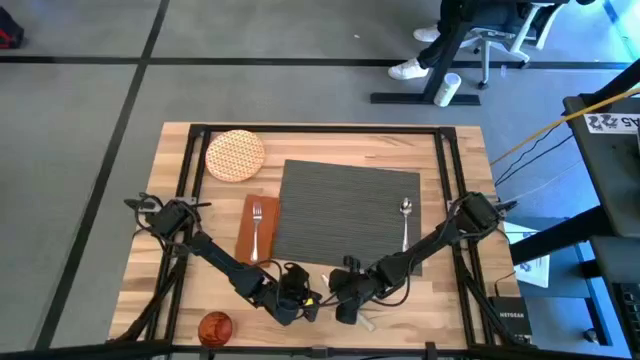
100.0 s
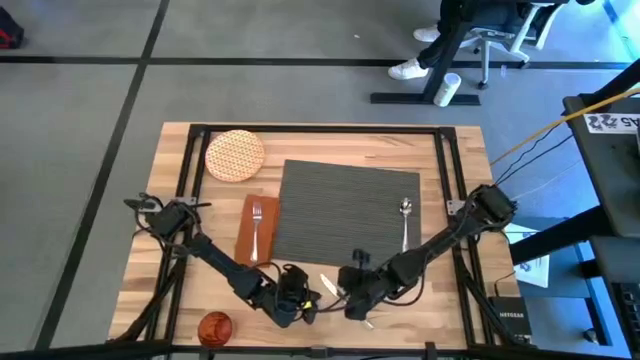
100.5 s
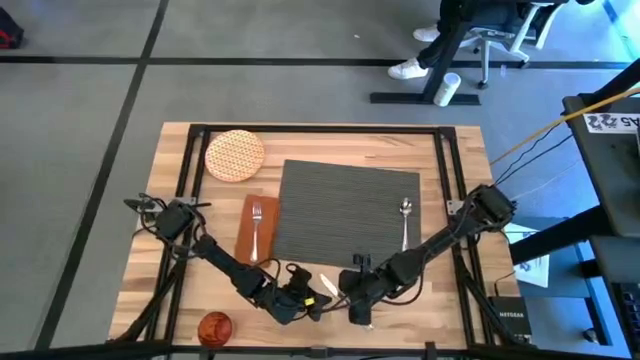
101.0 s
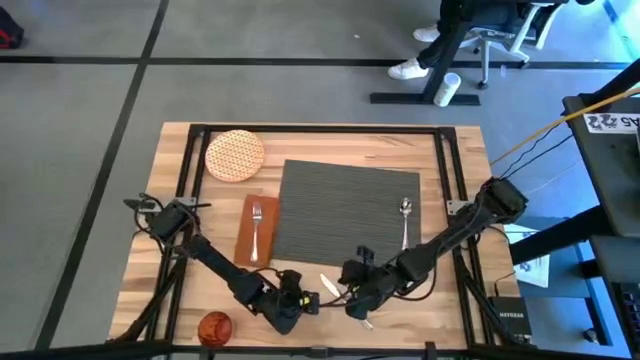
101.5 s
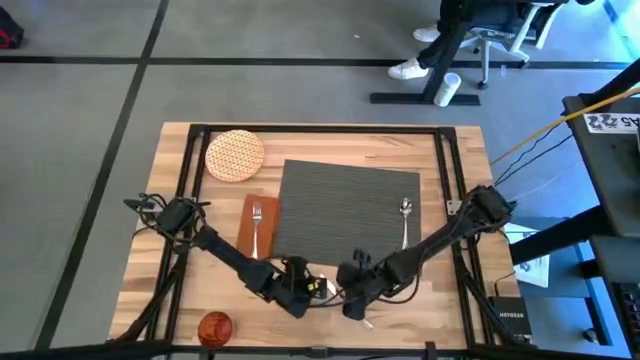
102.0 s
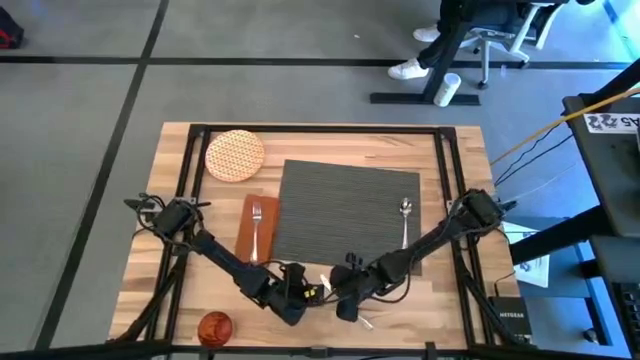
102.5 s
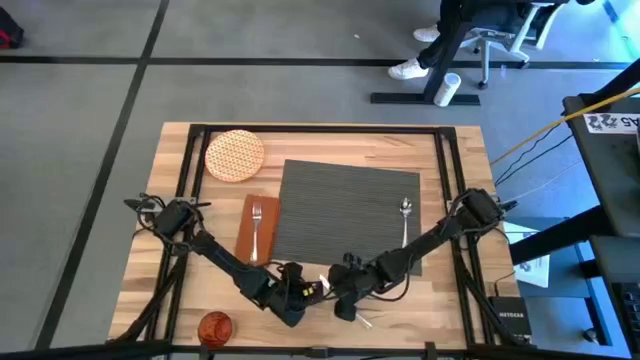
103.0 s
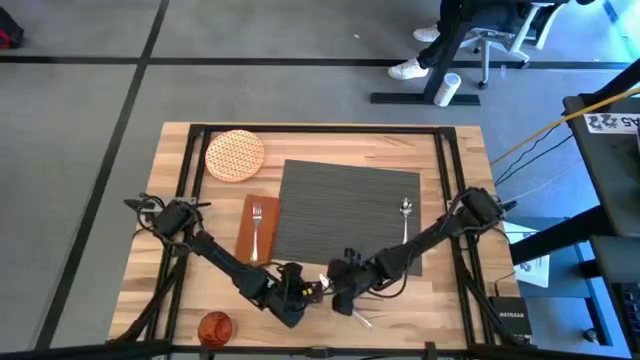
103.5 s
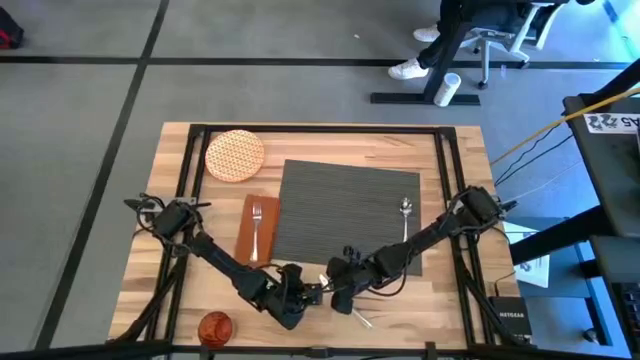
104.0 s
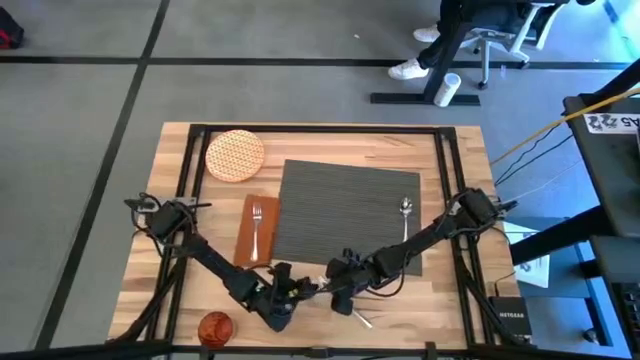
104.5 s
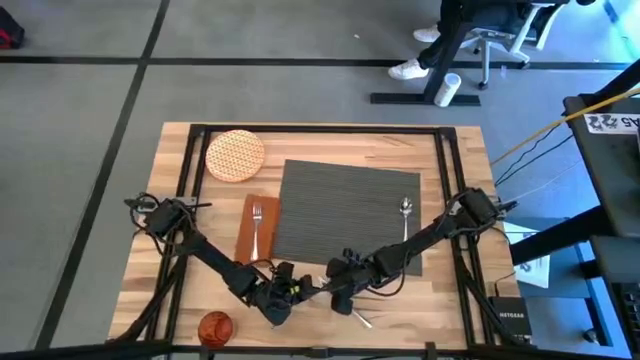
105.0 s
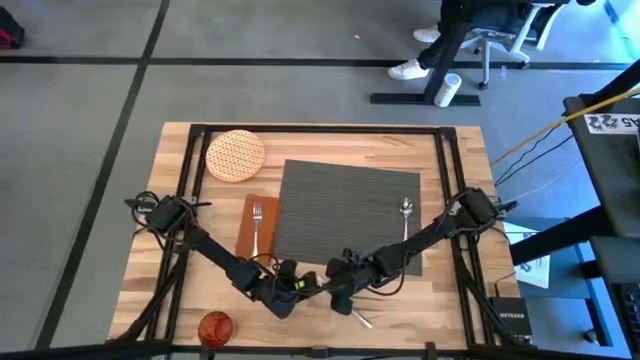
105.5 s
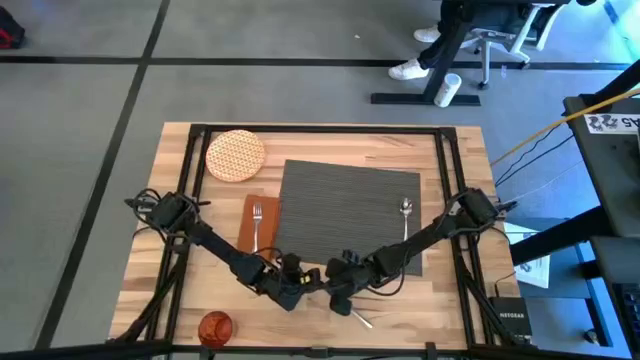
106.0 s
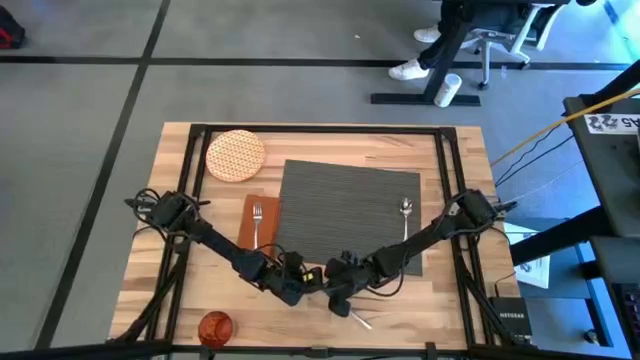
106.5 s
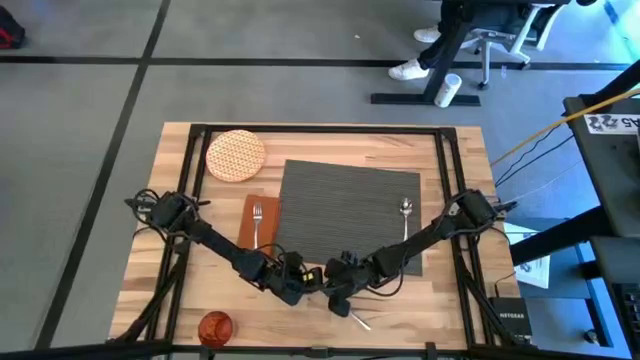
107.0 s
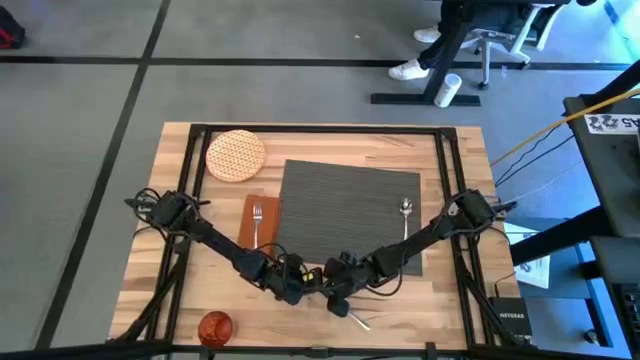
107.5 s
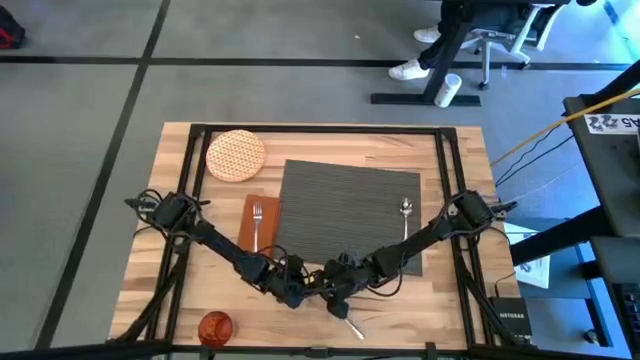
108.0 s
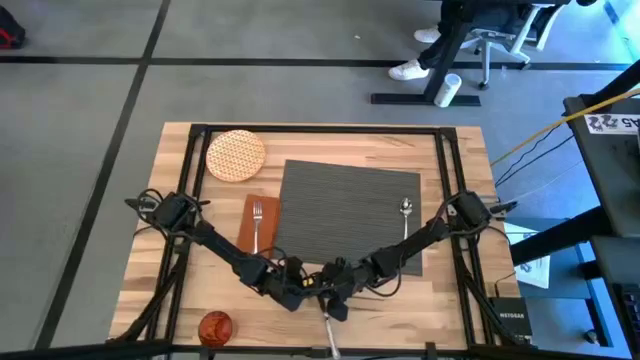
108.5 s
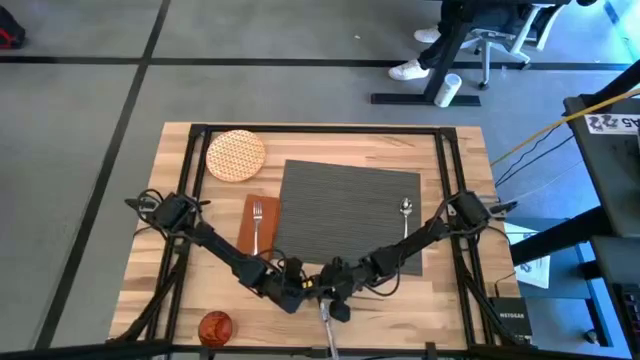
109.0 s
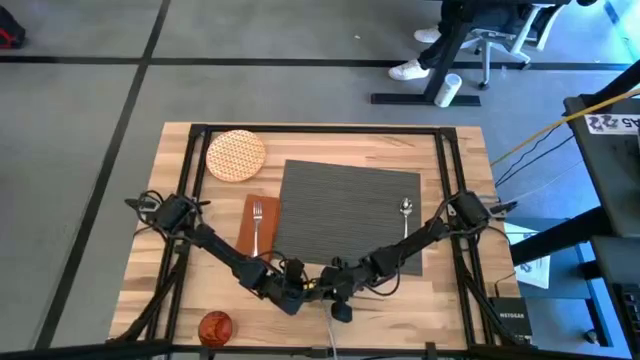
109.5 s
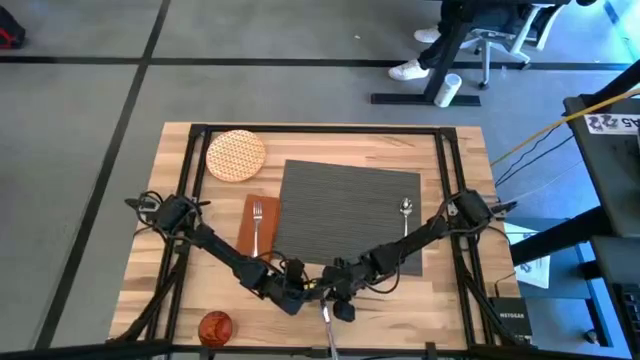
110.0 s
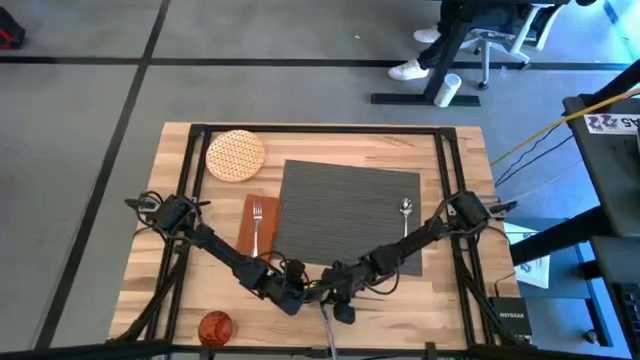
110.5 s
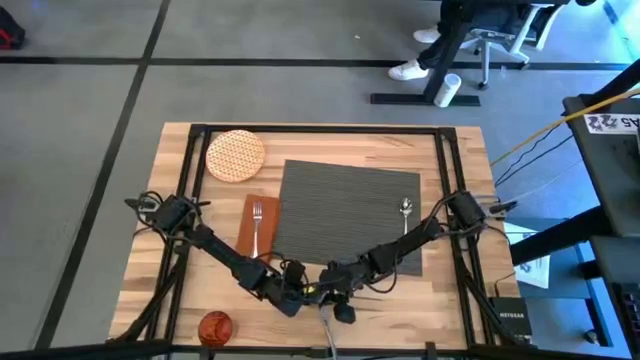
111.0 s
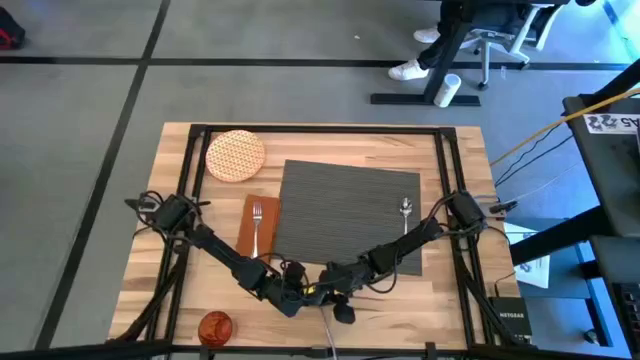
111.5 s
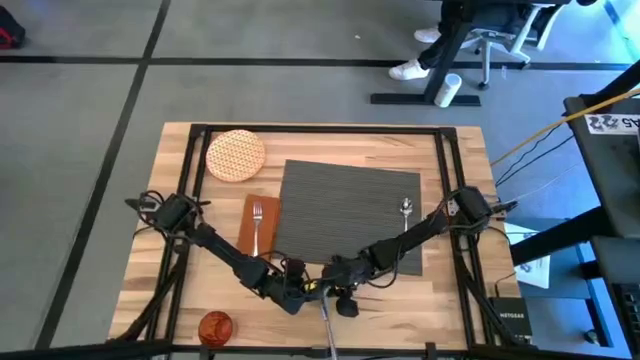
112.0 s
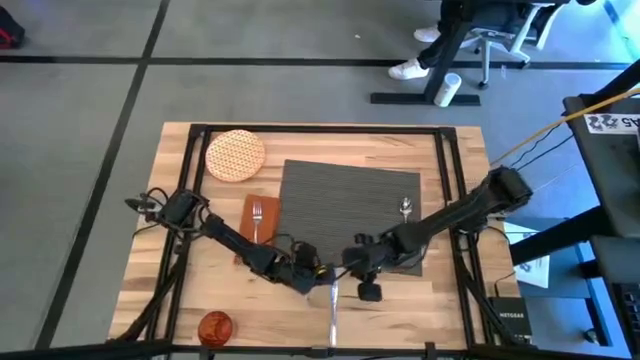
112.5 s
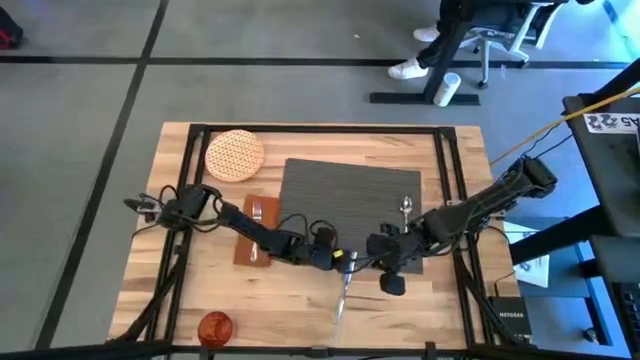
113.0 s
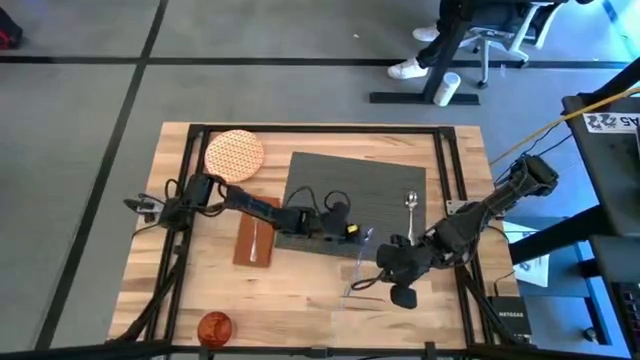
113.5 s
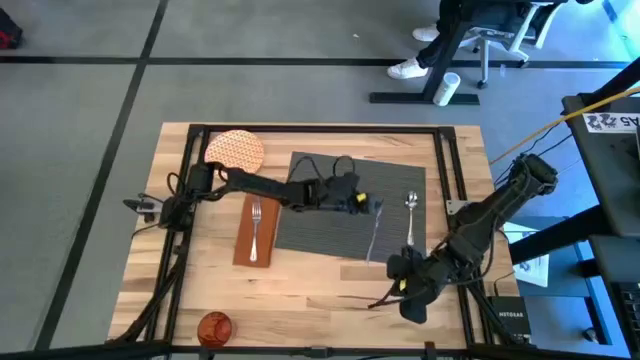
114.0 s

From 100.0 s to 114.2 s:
Task: Set table place
Put the silver table knife on the gray tablemat to the left of the silver spoon

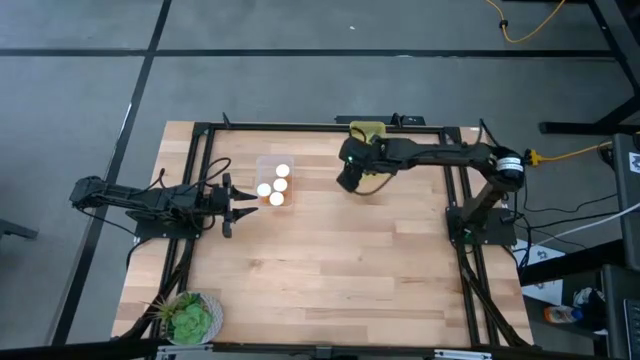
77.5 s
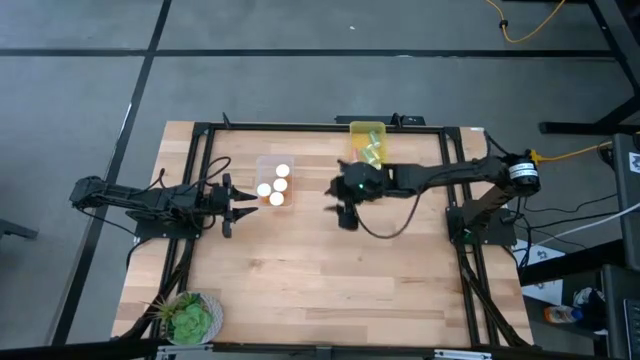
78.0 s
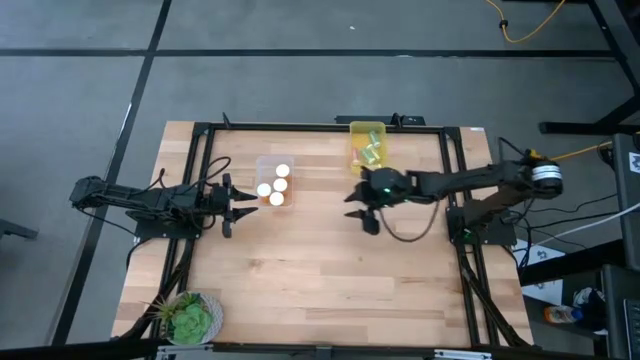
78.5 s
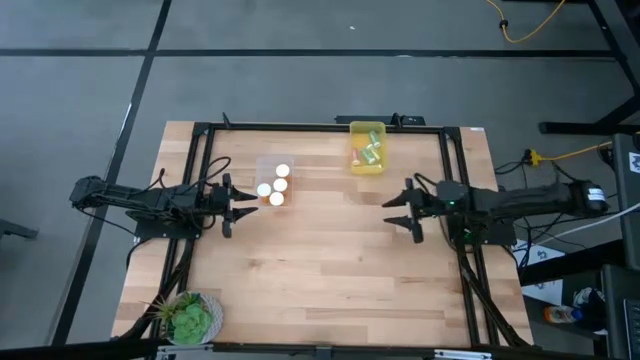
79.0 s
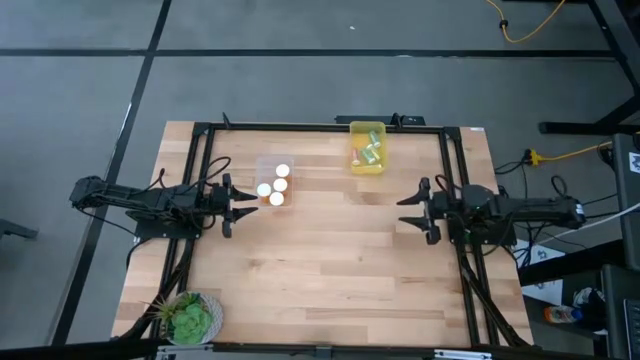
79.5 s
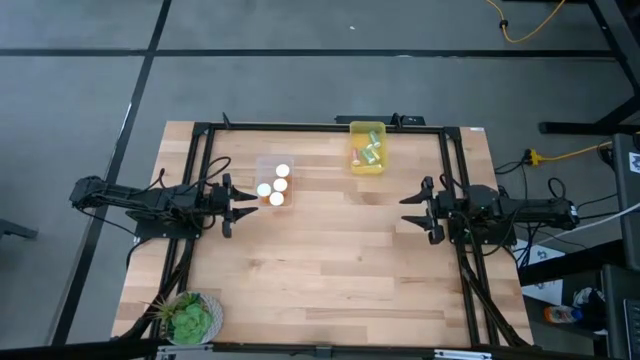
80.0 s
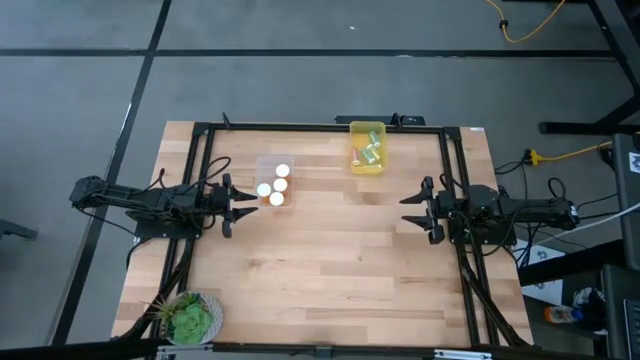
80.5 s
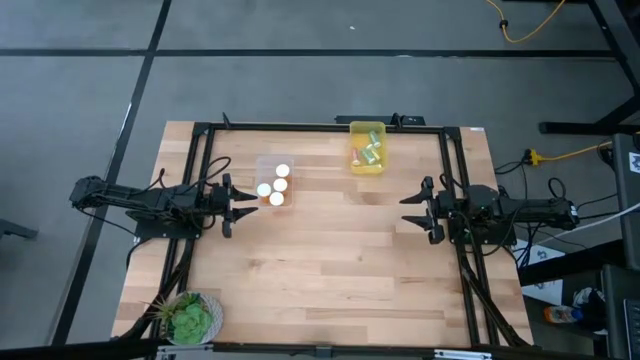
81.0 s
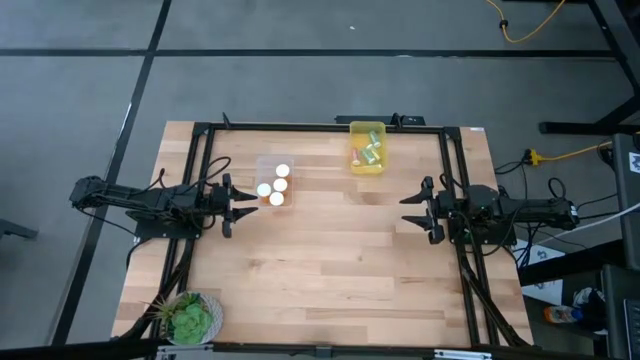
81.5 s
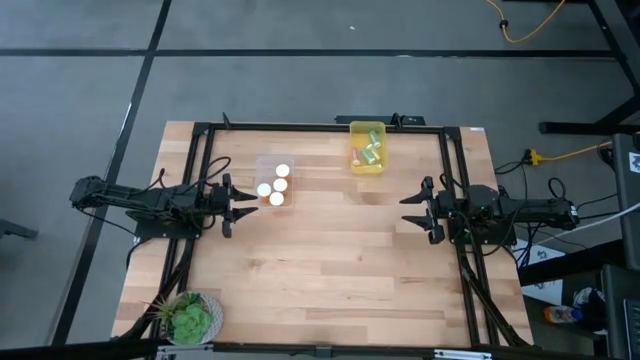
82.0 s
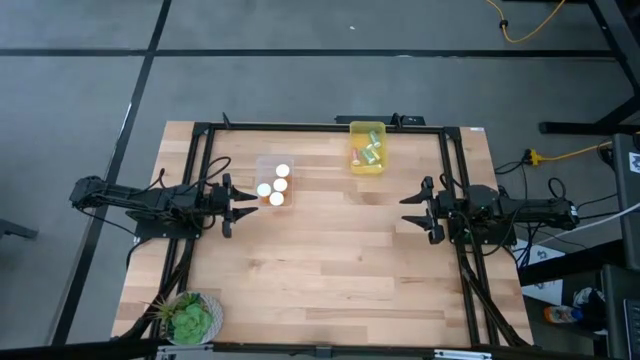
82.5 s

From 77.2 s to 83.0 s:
Task: Pick and place medicine bottles into bin by pill shape (circle, oval)
Return to Home Position

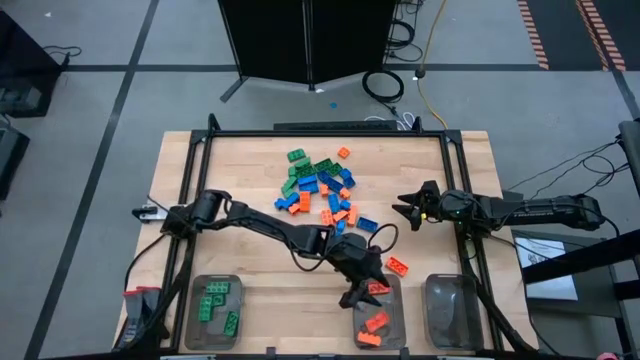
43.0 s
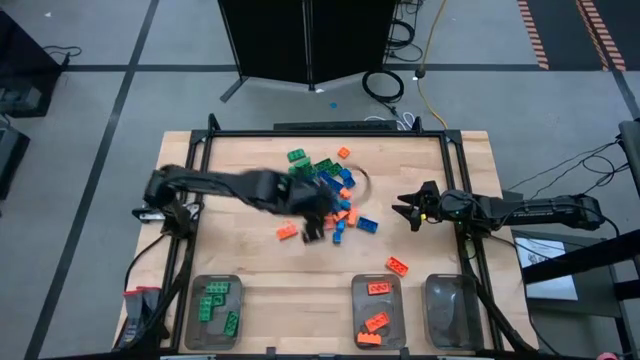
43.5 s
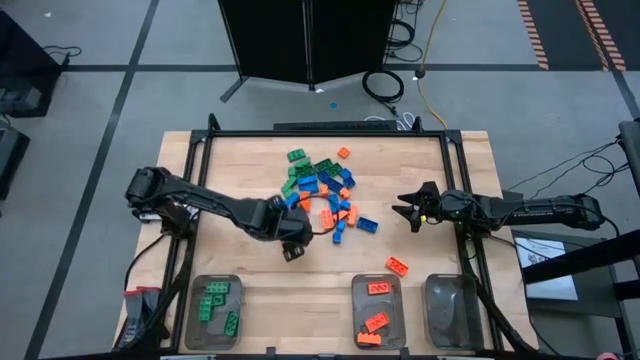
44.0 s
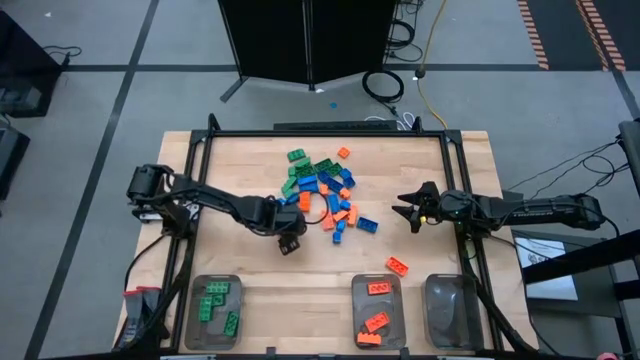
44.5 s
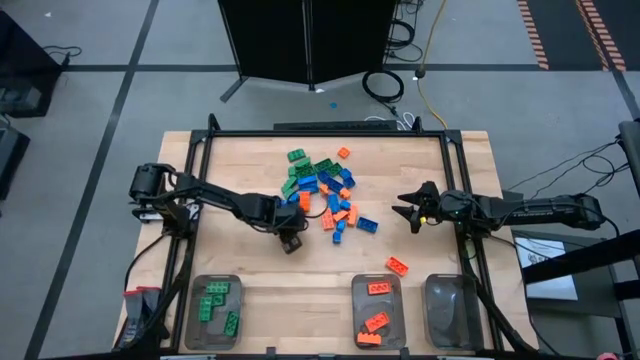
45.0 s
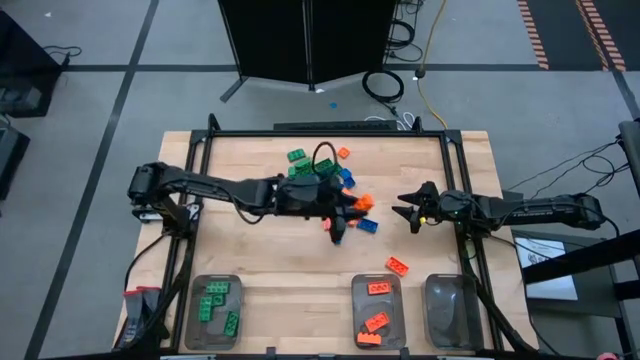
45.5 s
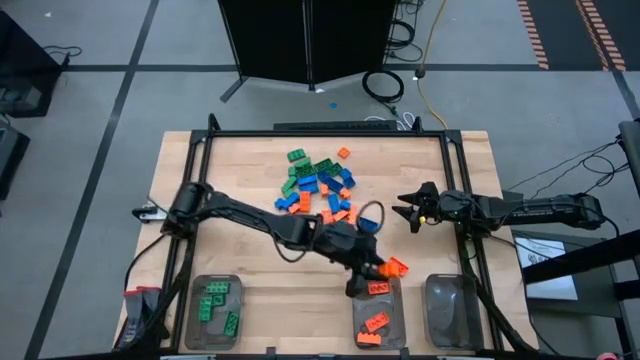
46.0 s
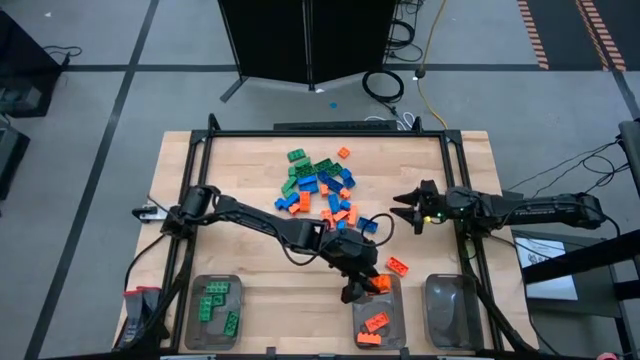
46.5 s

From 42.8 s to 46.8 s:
Task: Sort blocks
Put the orange game piece into the center black bin
